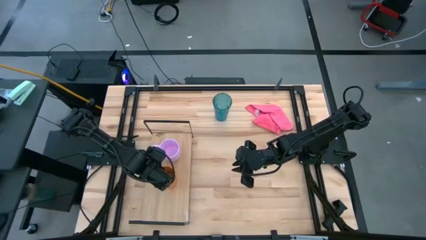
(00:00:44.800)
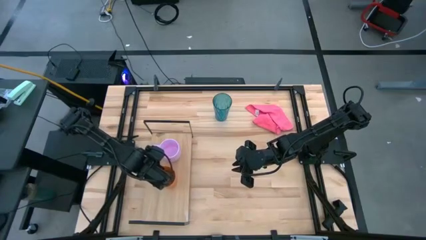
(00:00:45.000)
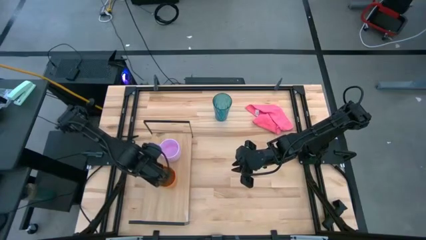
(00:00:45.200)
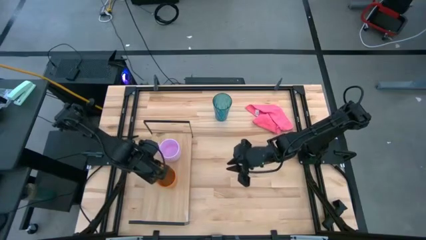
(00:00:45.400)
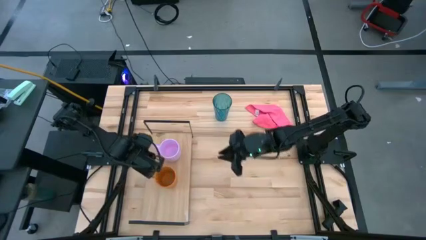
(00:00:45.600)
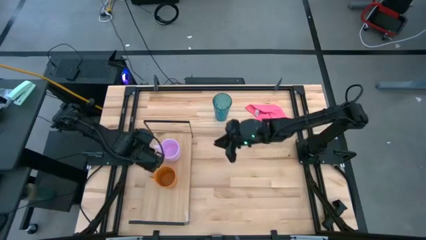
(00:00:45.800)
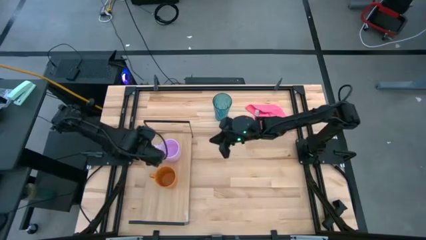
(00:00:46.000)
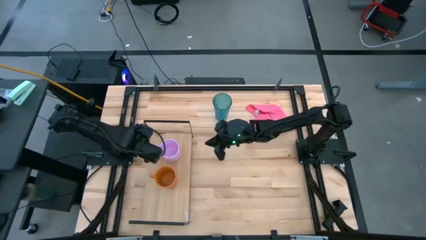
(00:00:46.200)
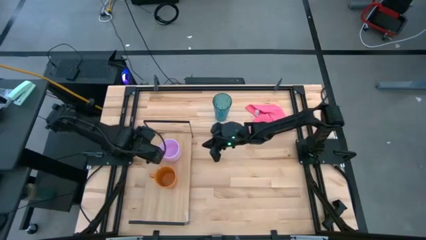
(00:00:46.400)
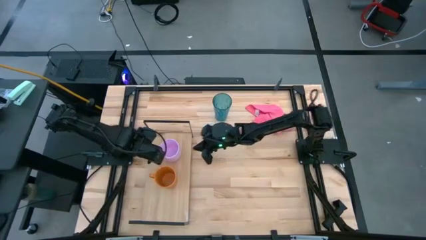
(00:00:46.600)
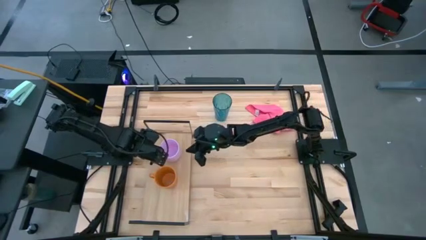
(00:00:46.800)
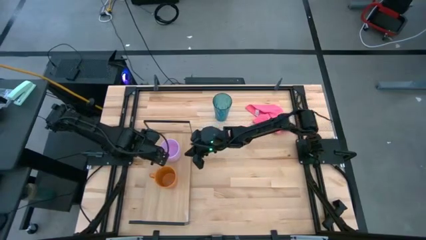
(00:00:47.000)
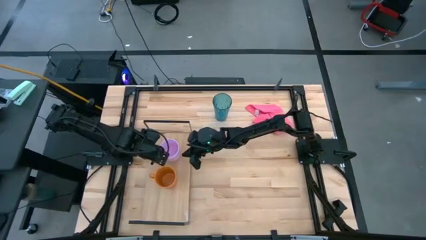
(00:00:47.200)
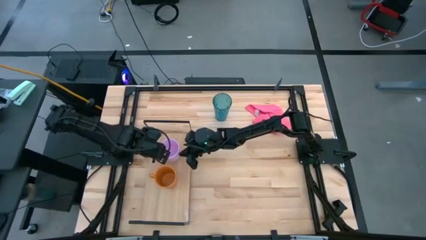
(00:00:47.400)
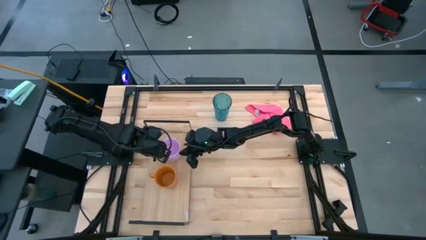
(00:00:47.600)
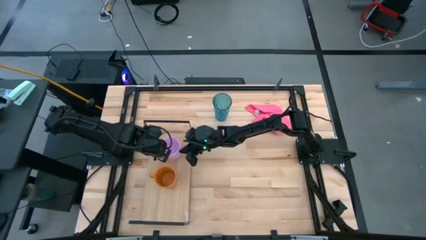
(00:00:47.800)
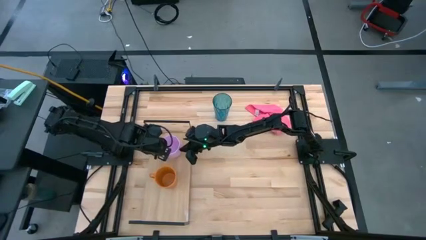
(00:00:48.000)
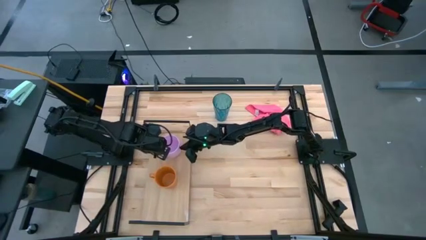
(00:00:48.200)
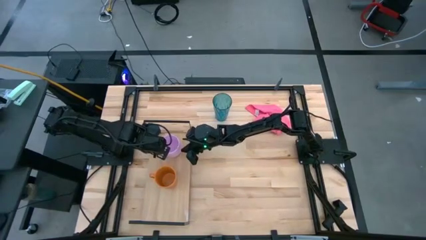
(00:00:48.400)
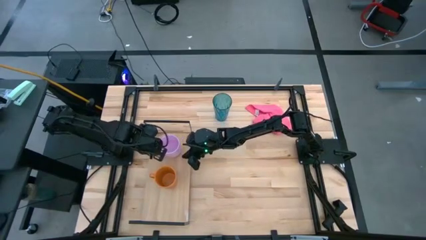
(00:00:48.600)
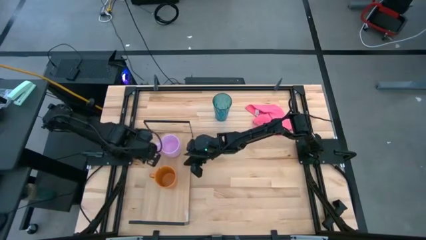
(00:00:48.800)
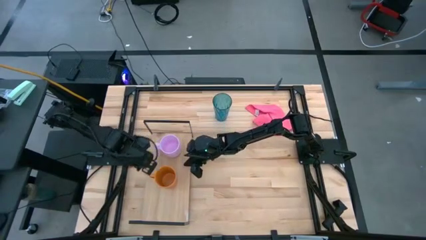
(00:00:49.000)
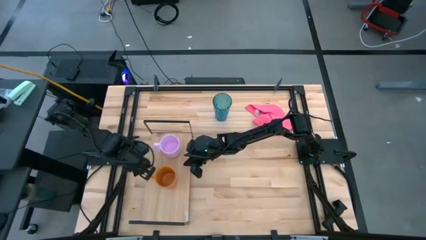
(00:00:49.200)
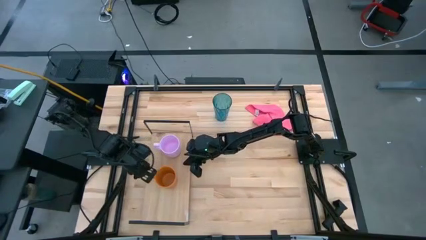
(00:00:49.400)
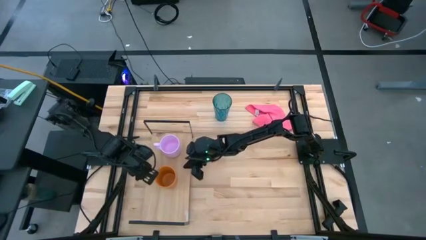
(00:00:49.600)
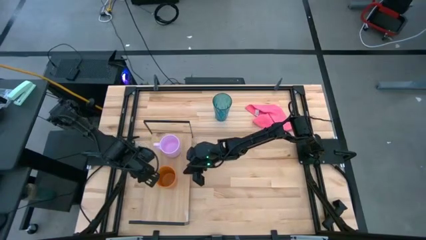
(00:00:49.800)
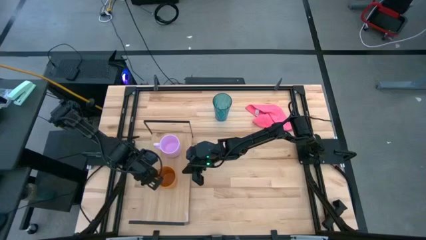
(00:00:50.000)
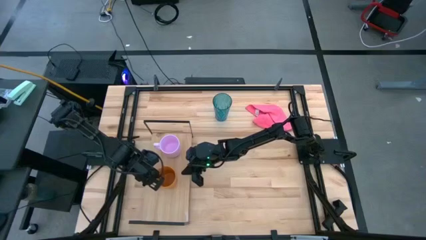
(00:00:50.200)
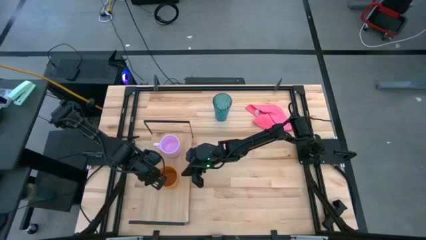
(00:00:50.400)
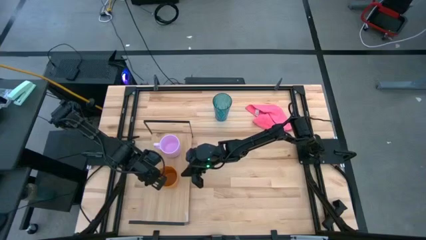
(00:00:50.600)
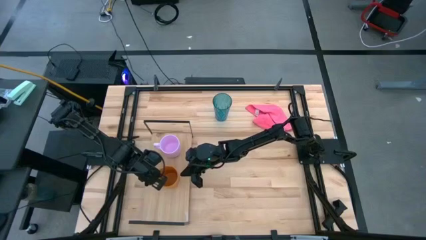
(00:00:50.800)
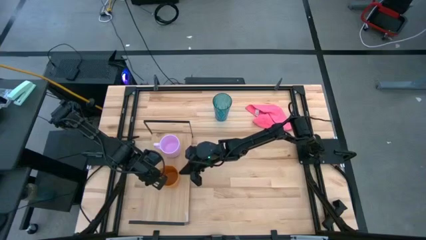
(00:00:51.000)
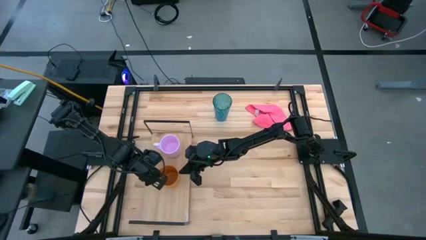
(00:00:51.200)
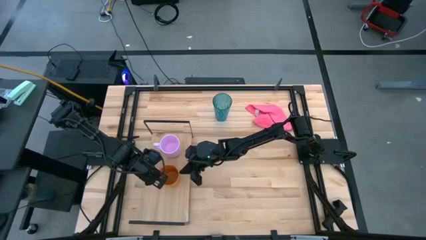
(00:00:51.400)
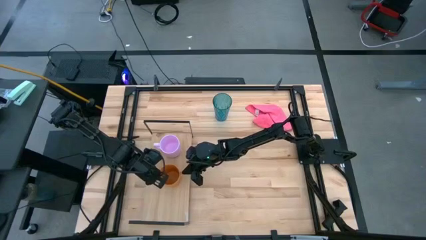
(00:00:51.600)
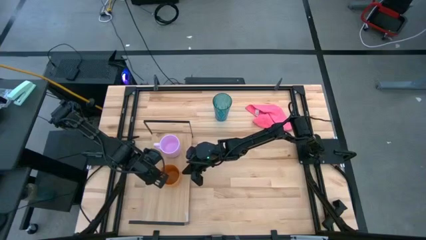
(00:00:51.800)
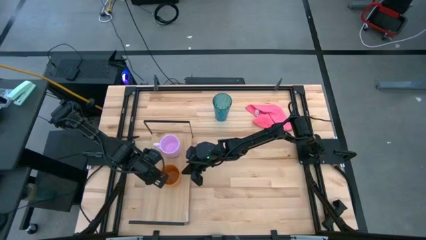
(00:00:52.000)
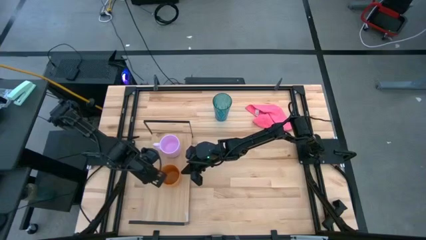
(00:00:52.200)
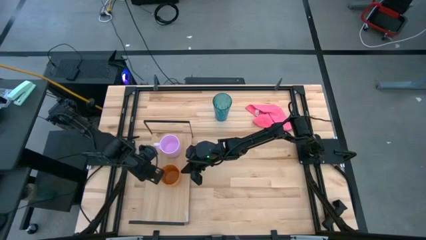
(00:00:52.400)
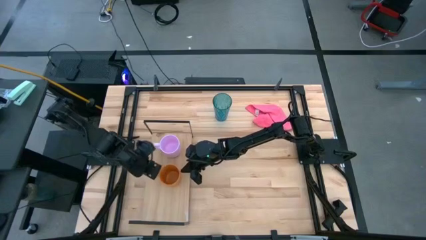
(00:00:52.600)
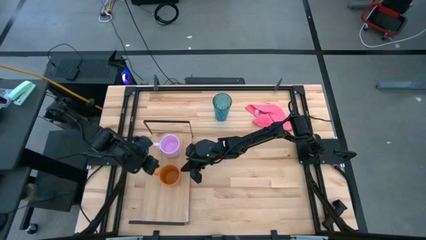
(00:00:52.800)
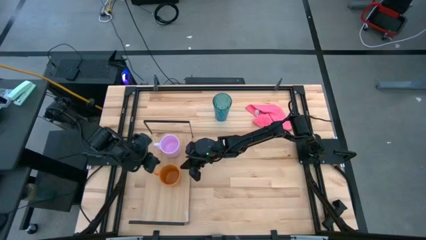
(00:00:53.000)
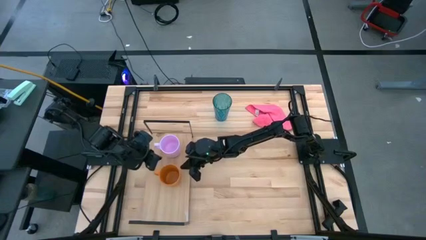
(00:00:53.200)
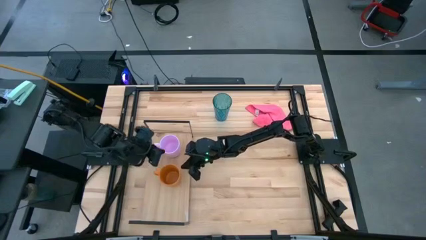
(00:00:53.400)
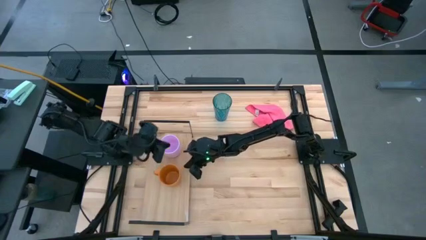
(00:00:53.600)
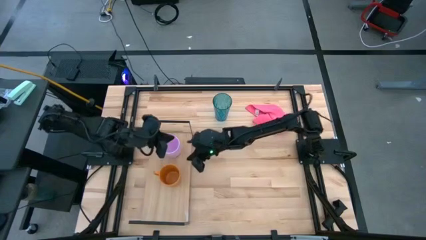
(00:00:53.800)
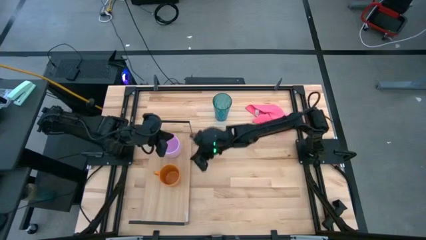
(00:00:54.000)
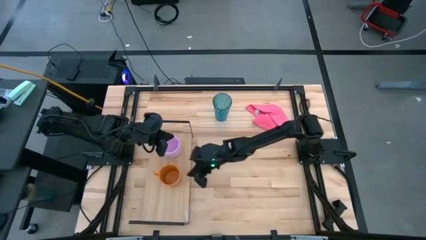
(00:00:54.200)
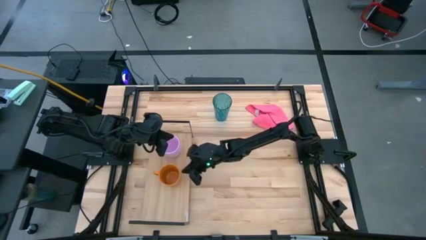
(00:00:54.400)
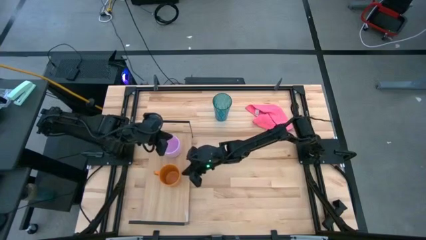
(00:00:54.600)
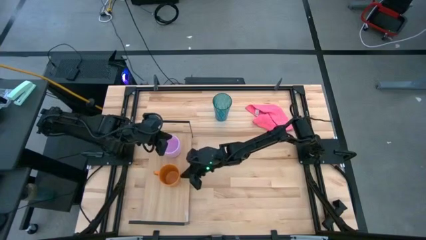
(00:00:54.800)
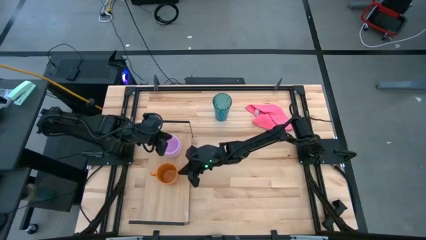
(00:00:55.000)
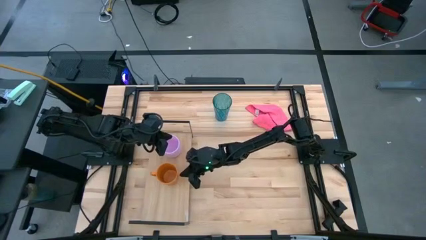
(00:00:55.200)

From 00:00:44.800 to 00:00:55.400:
Task: Stack small to large cups/mugs on shelf
Adjust the cups on the shelf
